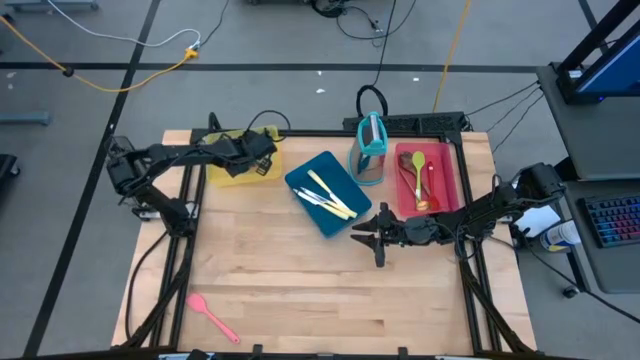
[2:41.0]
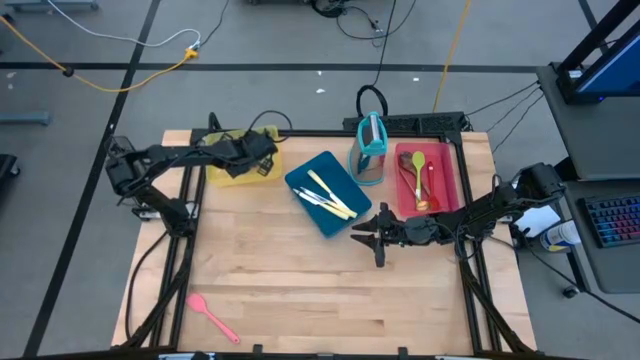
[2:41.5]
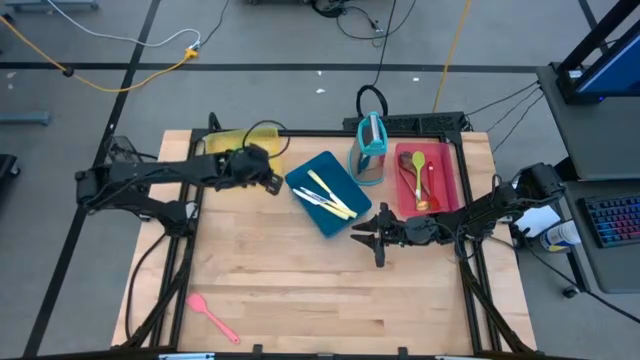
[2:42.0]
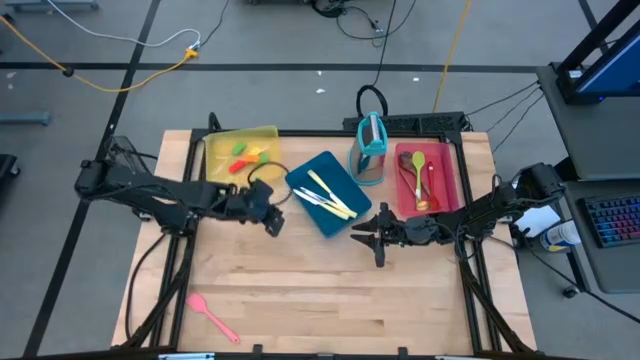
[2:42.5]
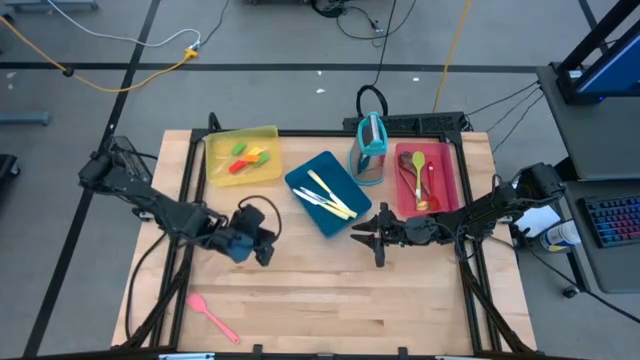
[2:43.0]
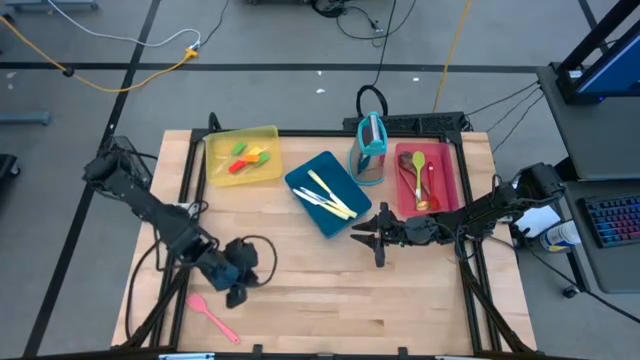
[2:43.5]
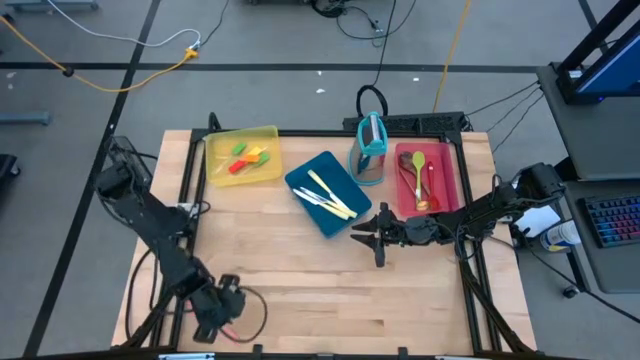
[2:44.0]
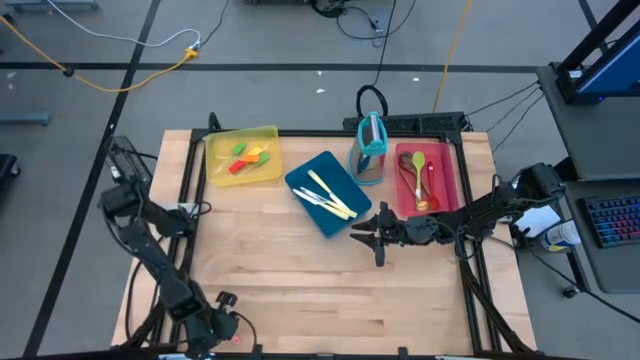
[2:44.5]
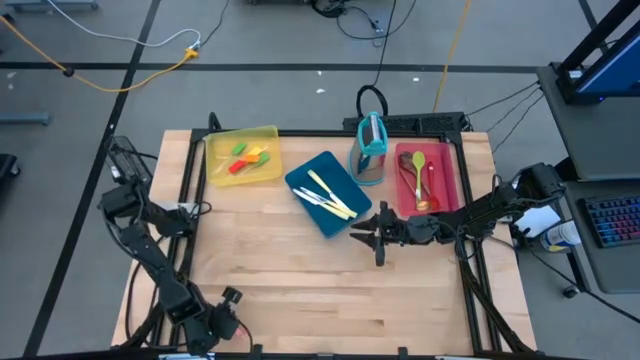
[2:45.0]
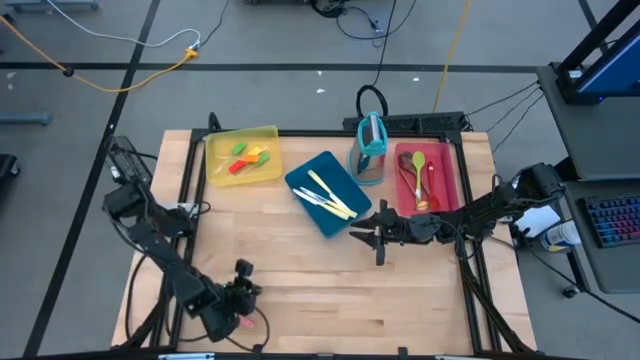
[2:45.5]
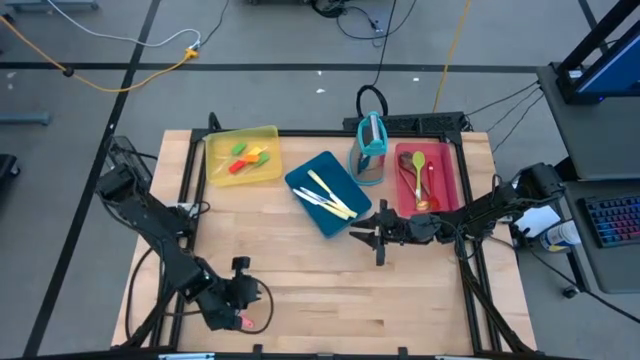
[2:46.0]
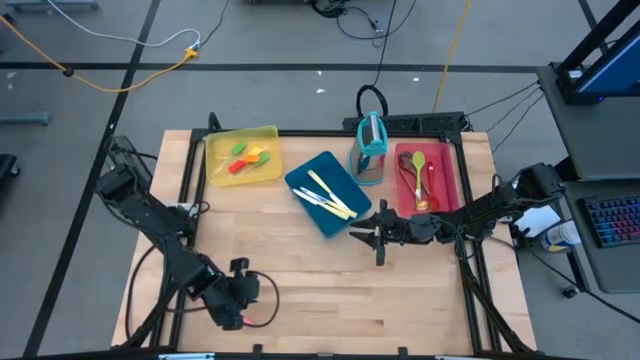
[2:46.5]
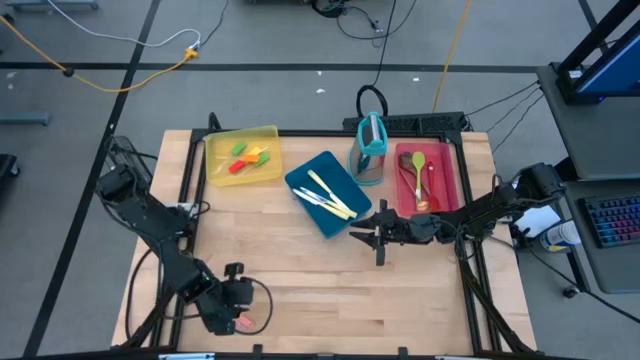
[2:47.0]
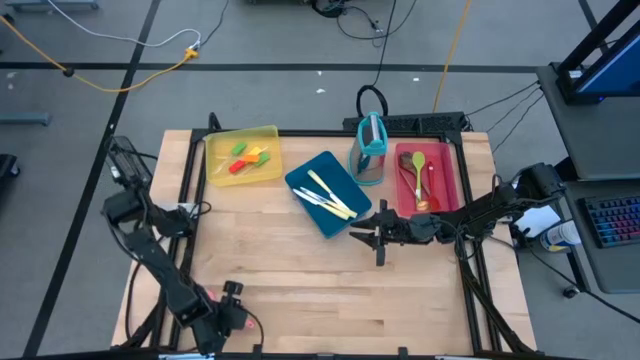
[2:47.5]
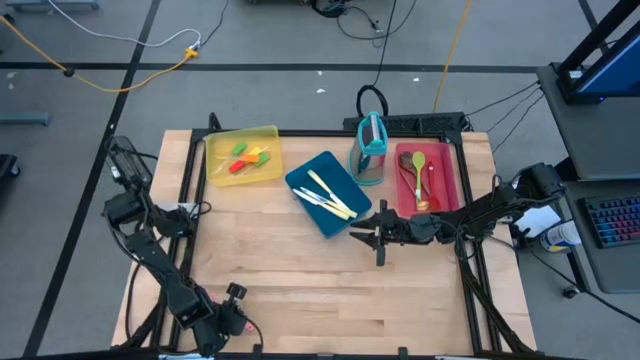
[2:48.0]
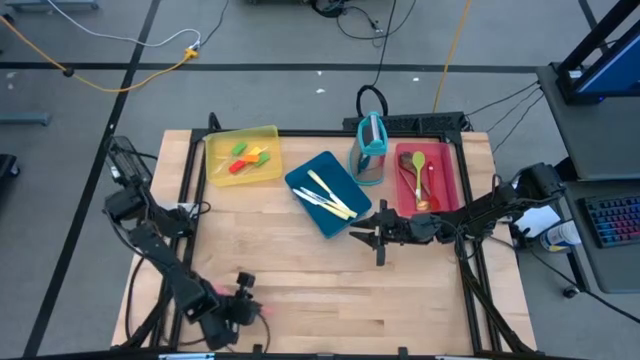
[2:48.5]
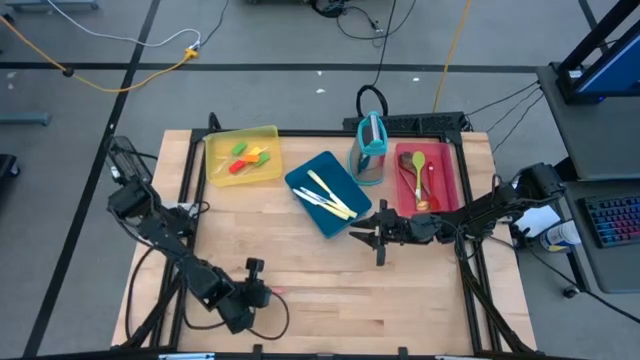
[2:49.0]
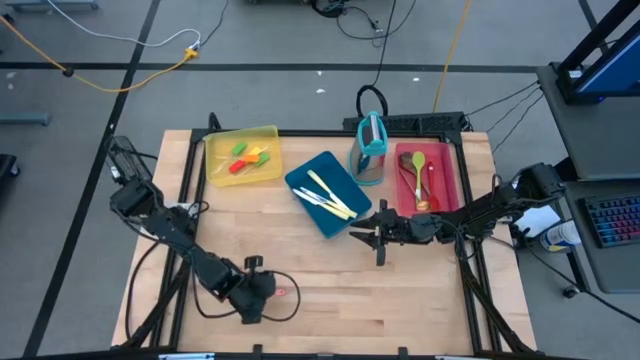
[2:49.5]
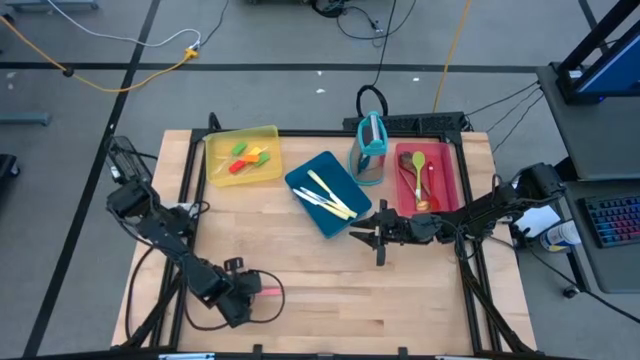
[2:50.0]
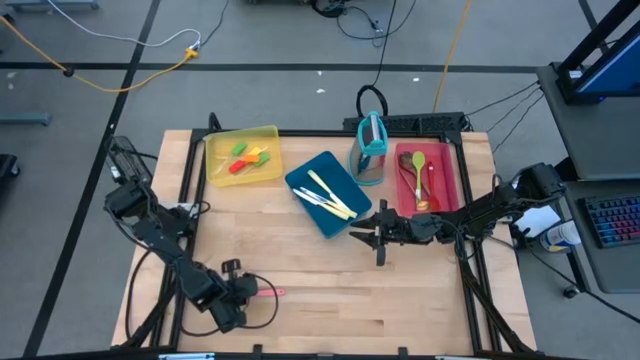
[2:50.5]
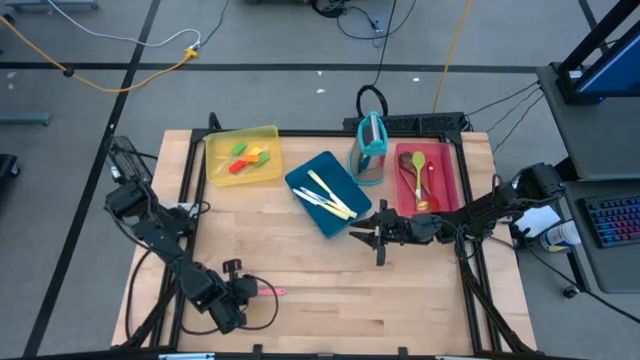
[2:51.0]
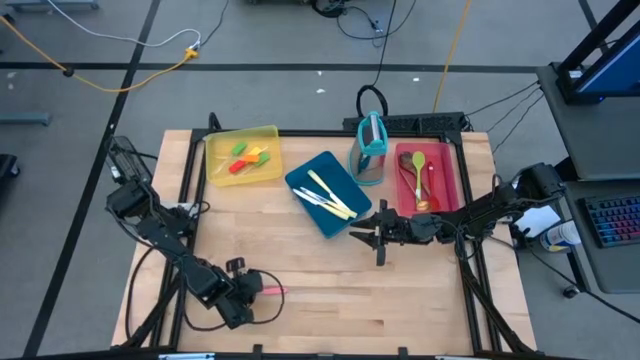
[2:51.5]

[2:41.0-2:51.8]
Task: Pick & Place Kitchen Items
Put the pink spatula into the yellow bin

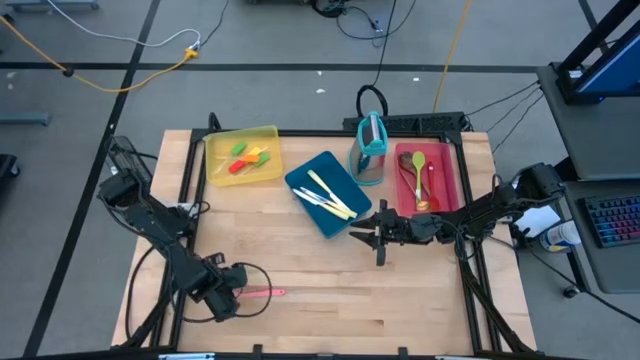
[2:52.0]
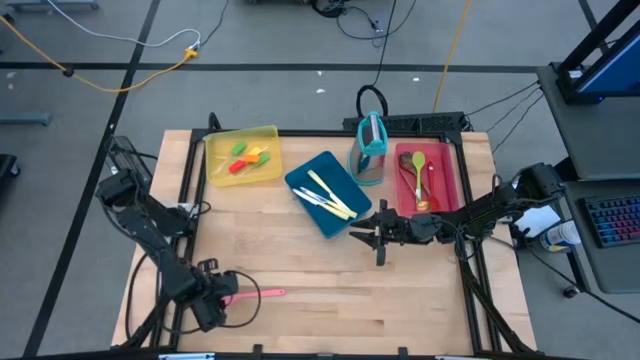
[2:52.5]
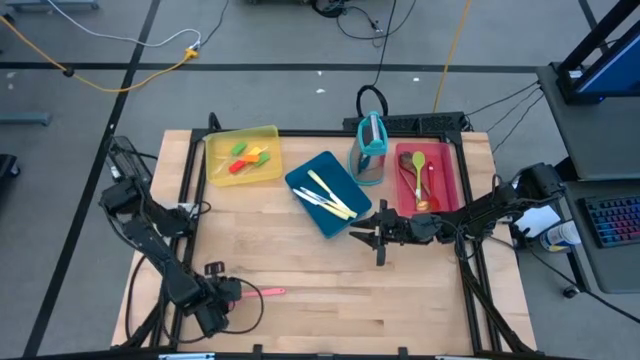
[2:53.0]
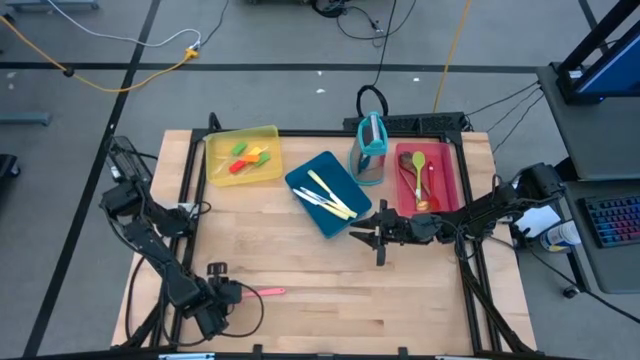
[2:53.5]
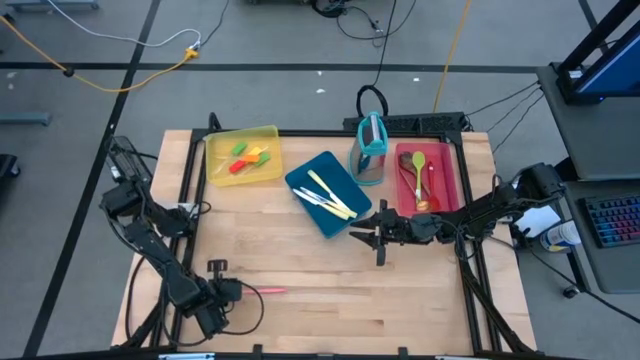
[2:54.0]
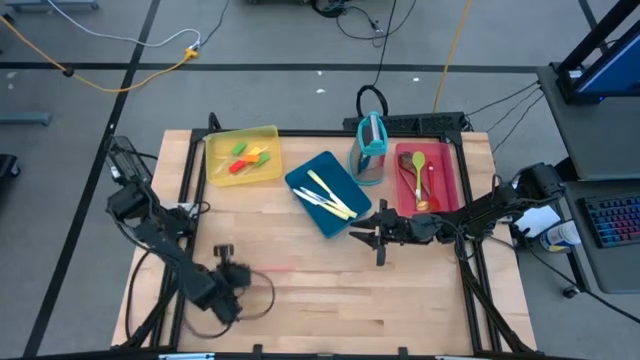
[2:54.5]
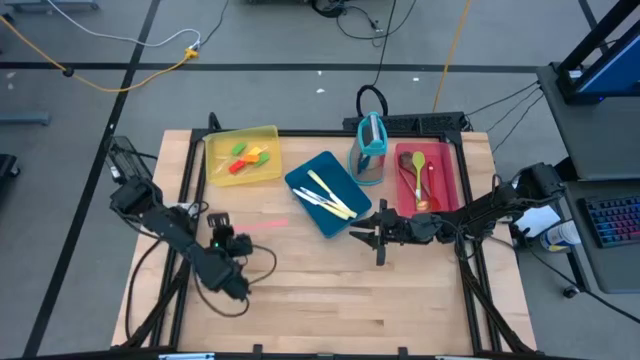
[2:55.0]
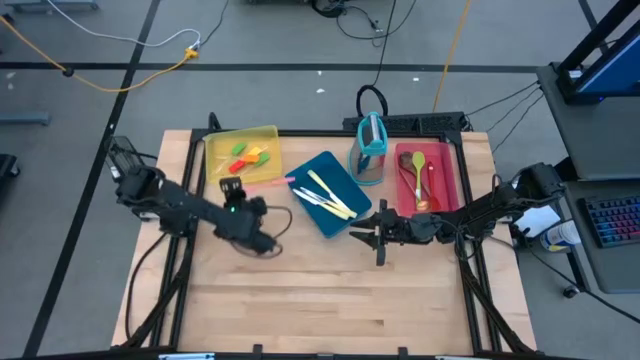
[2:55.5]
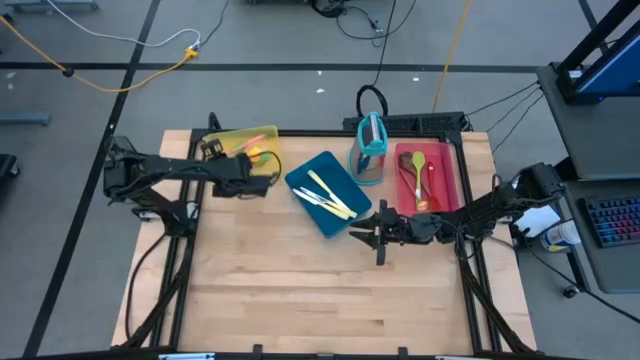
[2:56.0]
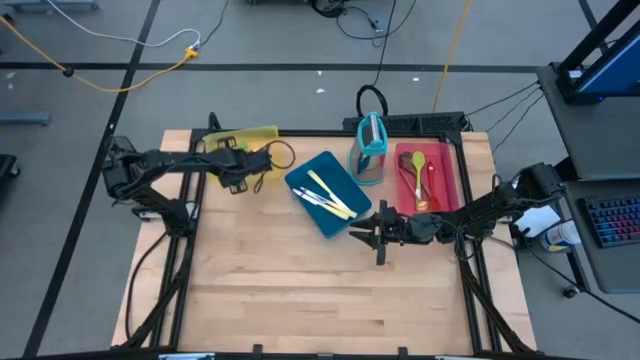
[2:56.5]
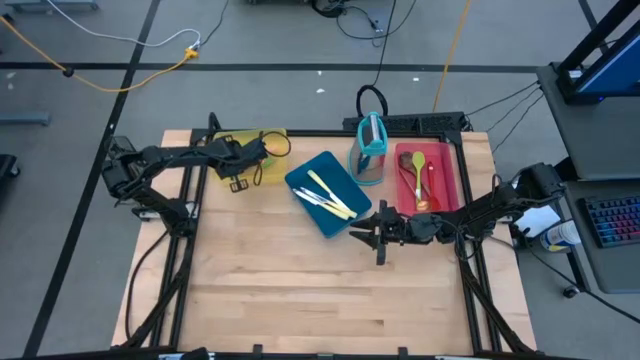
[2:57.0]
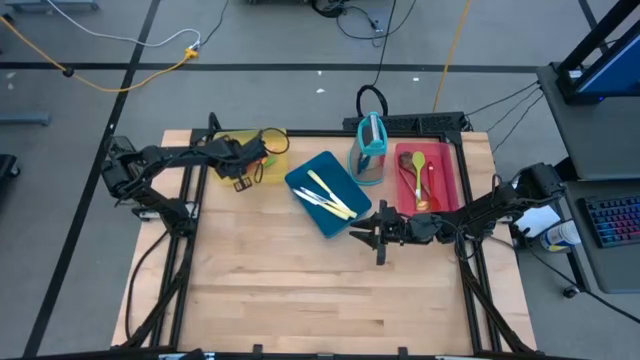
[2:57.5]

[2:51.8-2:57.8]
Put the pink spatula into the yellow bin

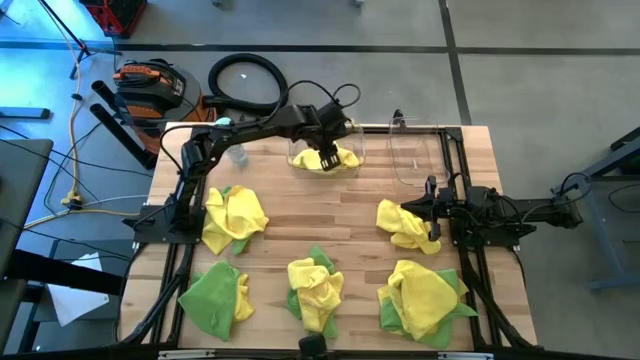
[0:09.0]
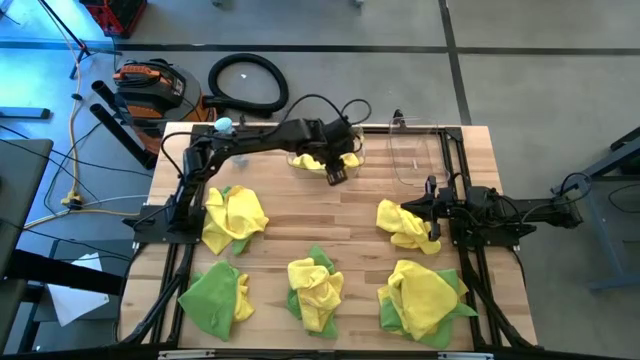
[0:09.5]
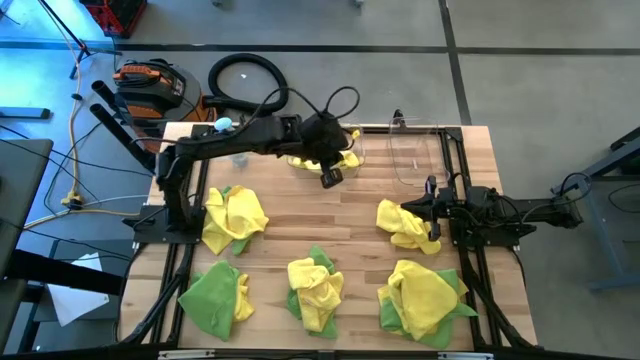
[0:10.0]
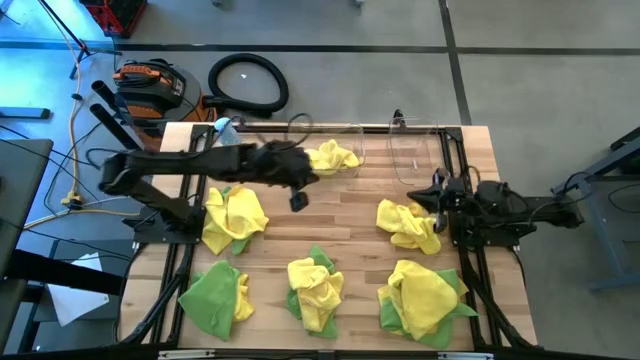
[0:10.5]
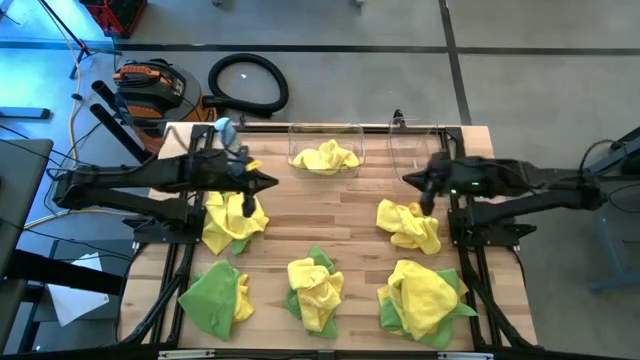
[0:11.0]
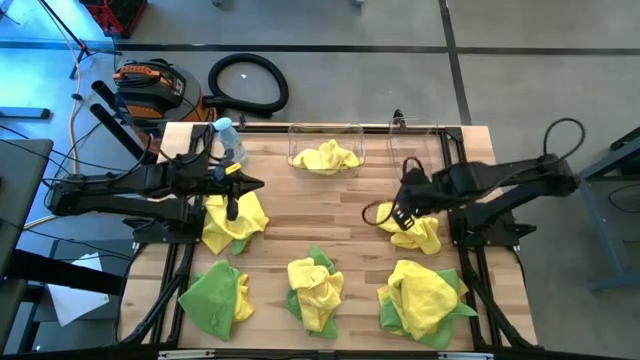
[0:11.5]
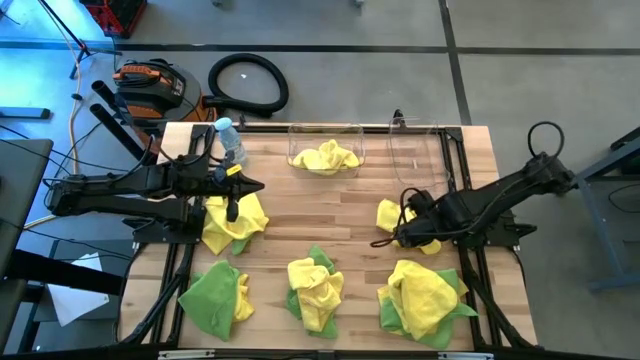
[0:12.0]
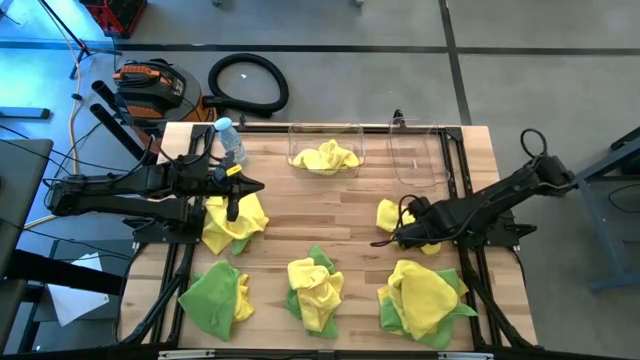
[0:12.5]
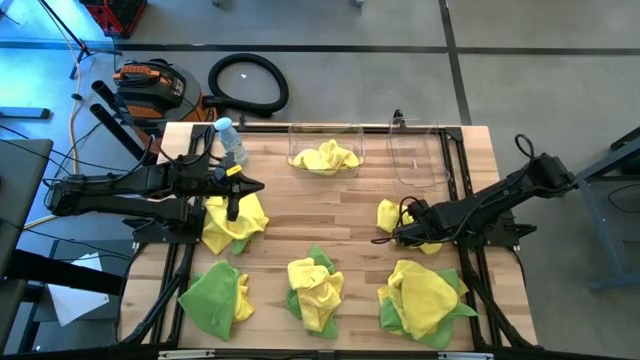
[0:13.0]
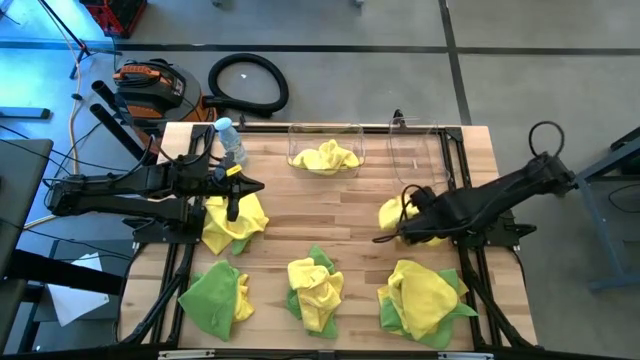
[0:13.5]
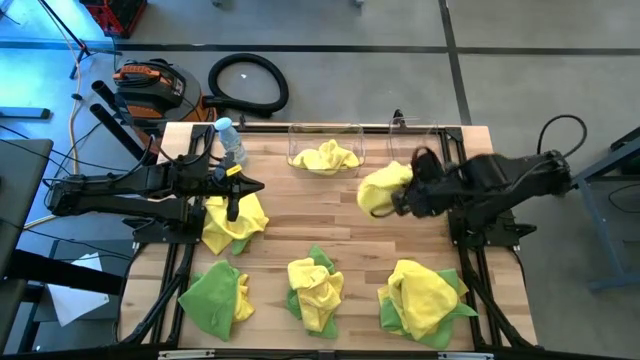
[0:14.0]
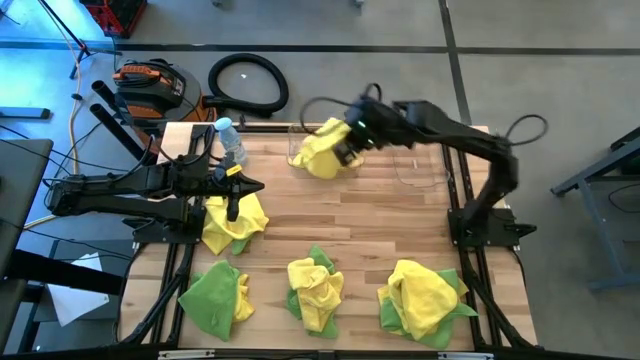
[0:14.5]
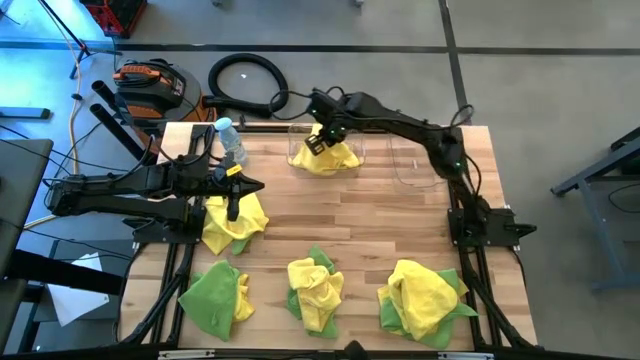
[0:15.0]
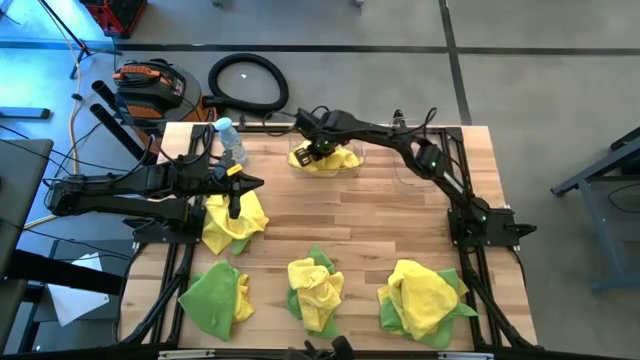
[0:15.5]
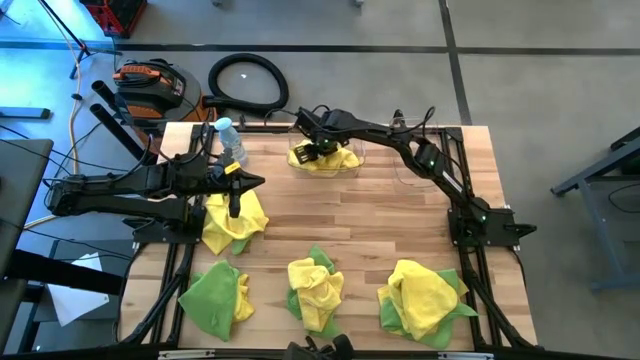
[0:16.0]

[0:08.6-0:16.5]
Task: Sort microfiber towel by color & place in baskets
Put the top right yellow microfiber cloth into the left transparent bin
